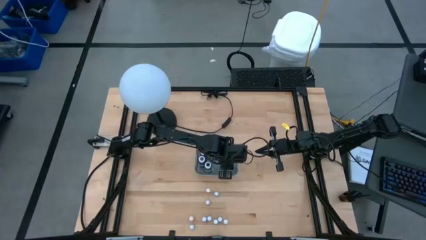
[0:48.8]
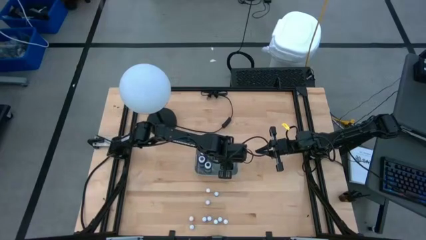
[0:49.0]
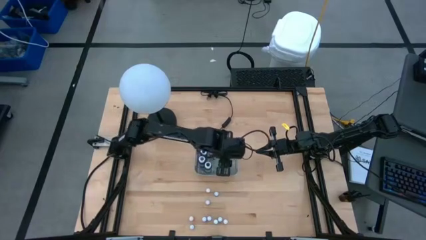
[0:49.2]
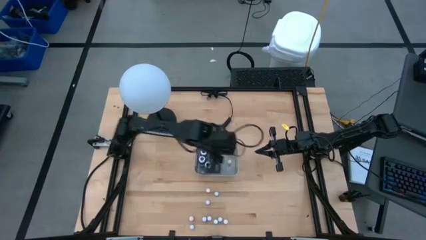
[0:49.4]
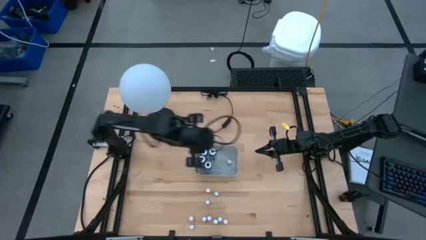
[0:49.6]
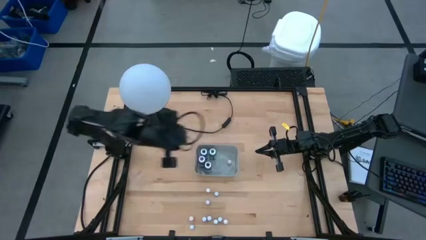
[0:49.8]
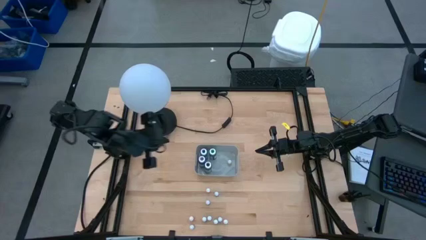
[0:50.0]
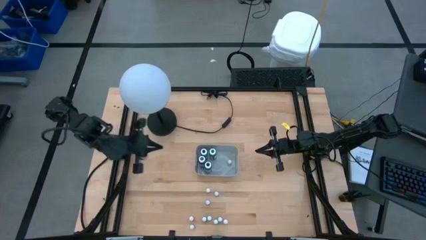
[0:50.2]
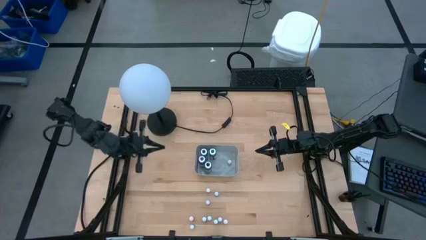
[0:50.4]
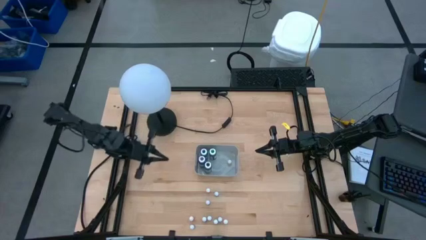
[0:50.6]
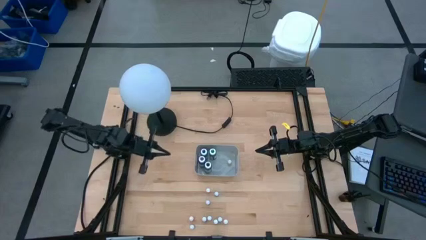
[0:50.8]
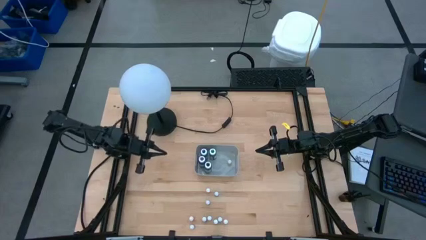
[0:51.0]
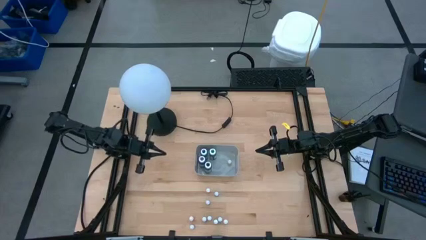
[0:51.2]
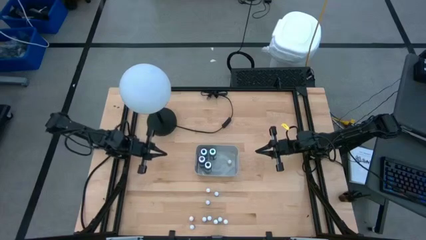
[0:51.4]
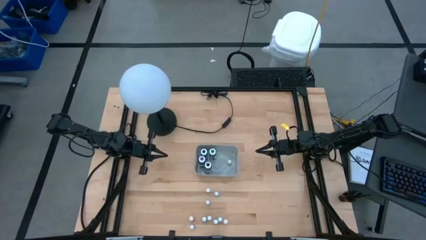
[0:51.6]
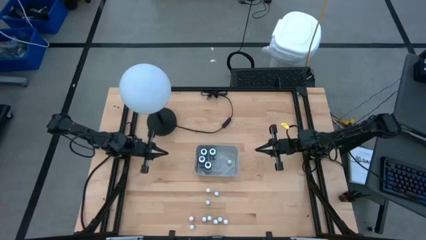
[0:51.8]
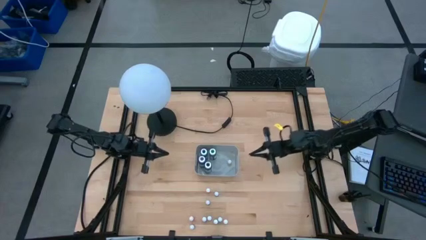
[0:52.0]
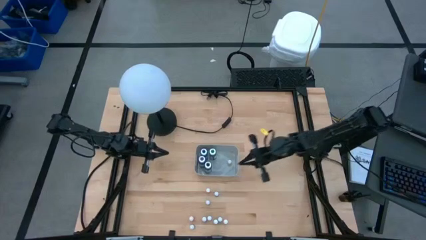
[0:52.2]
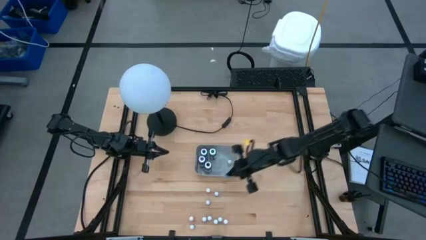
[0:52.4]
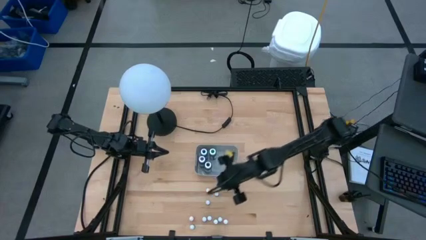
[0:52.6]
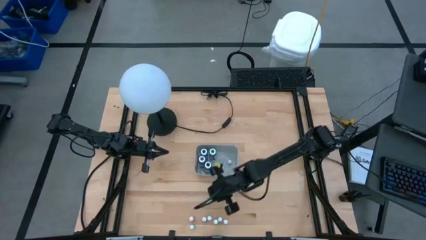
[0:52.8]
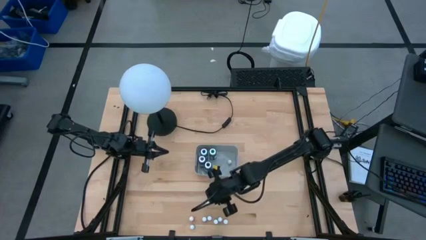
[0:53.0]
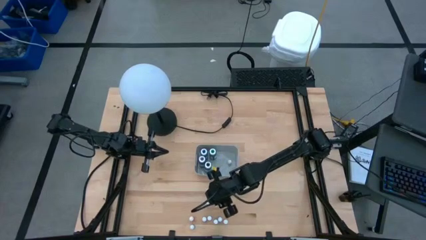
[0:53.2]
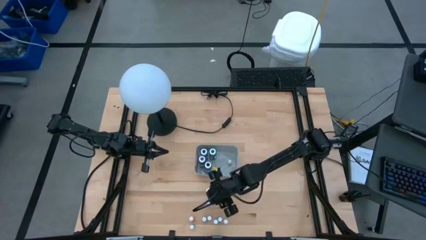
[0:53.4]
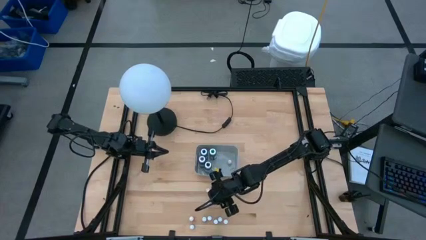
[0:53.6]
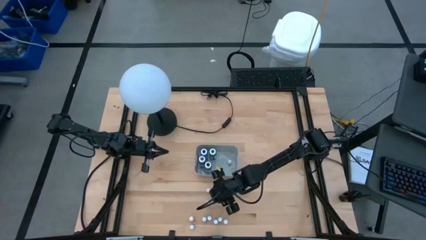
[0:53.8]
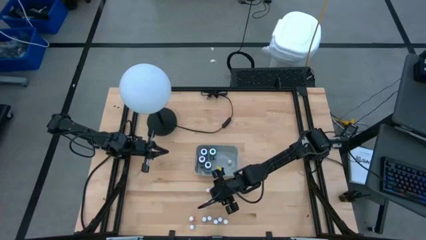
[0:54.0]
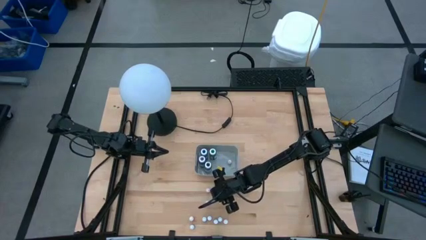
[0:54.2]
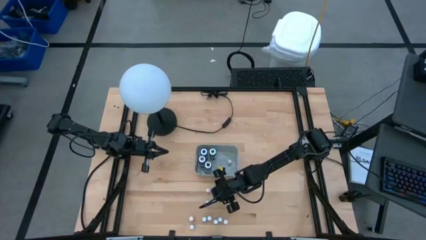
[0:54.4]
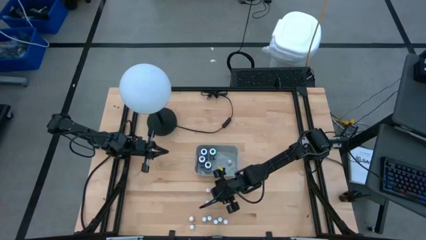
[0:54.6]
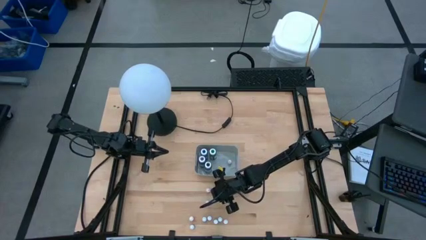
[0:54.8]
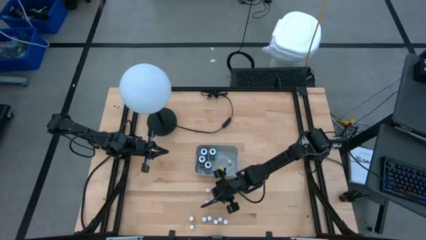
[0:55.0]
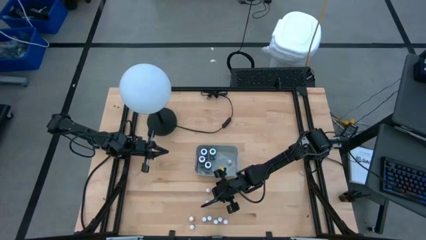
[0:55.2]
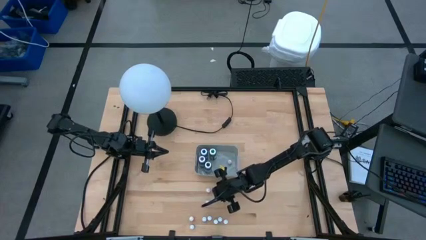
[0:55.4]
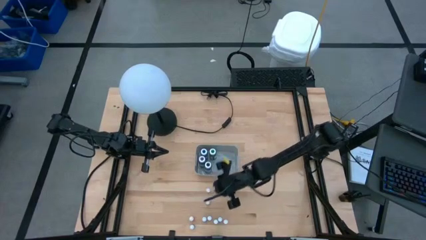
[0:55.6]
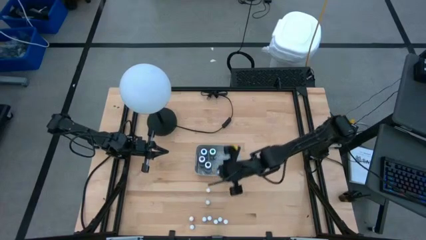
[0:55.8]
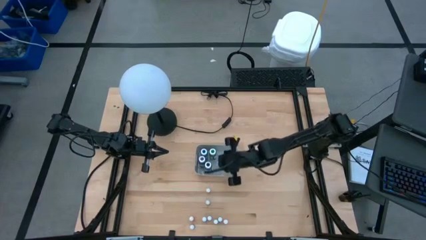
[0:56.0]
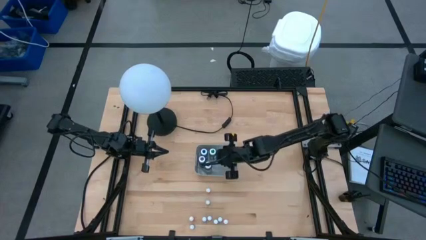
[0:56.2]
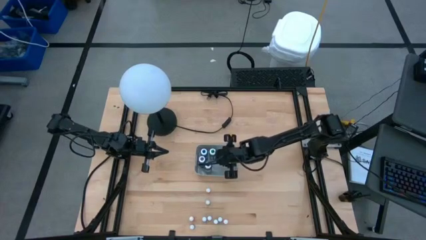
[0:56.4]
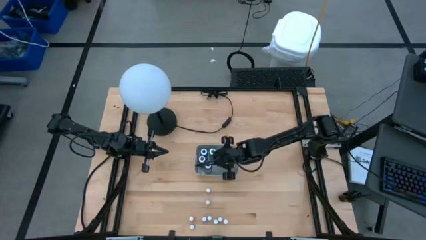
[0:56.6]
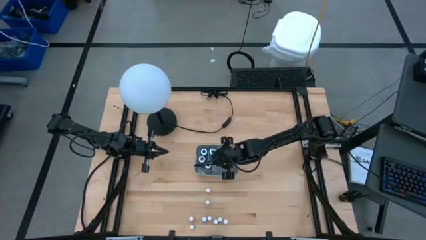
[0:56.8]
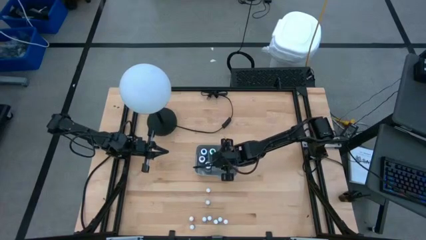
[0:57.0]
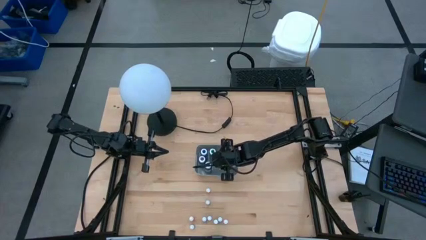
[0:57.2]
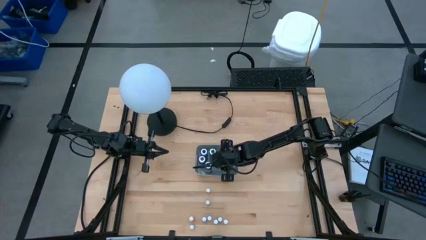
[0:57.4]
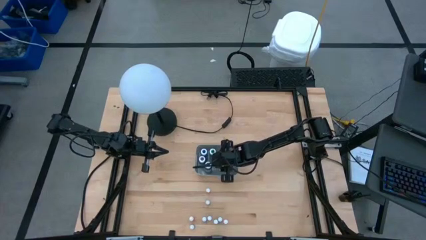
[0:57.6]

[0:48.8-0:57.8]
Task: Pick & Place food coloring
Put the small green food coloring bottle into the gray bin

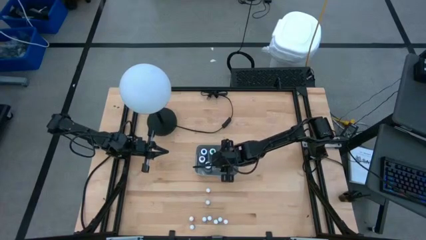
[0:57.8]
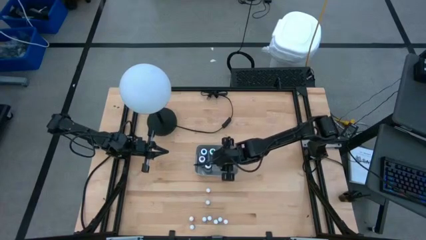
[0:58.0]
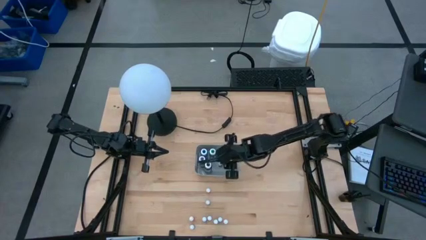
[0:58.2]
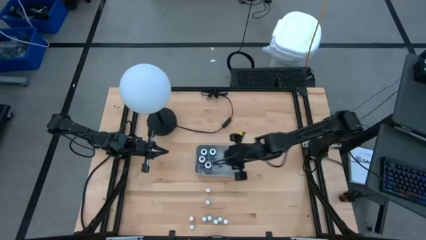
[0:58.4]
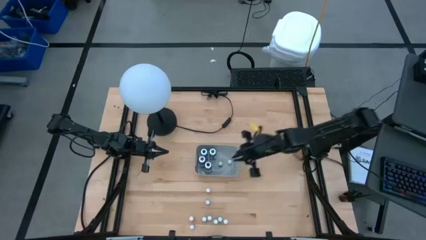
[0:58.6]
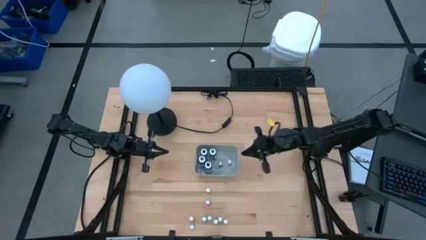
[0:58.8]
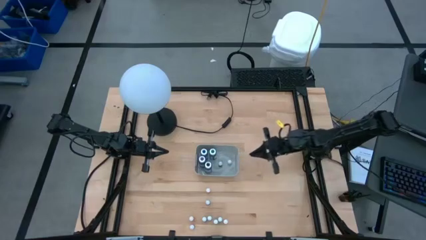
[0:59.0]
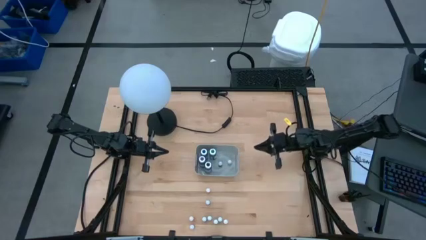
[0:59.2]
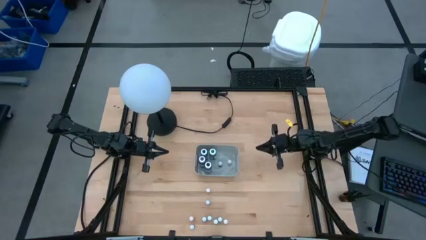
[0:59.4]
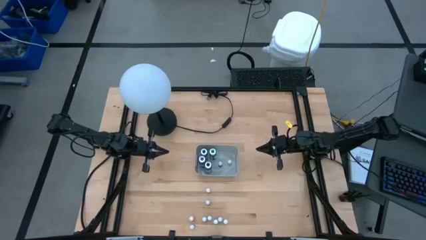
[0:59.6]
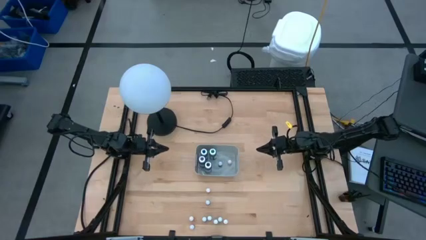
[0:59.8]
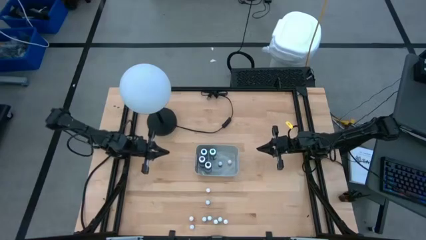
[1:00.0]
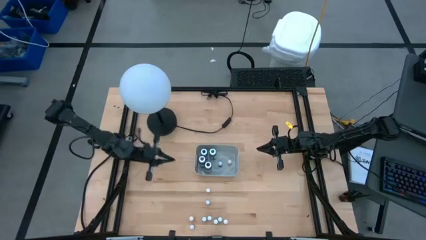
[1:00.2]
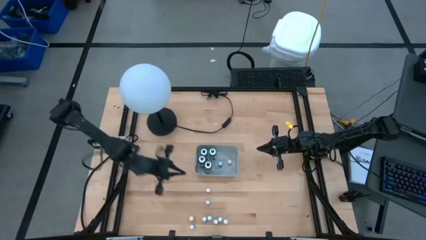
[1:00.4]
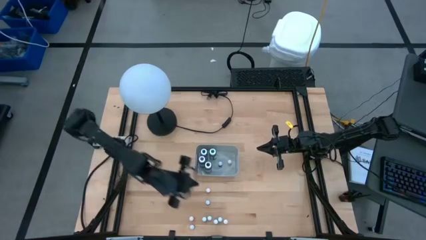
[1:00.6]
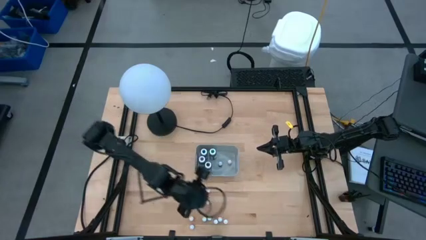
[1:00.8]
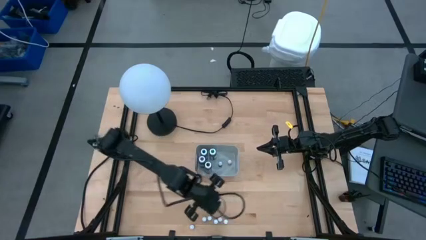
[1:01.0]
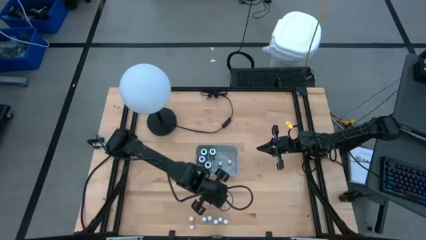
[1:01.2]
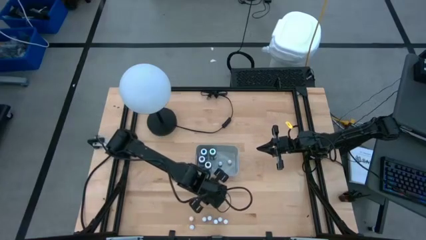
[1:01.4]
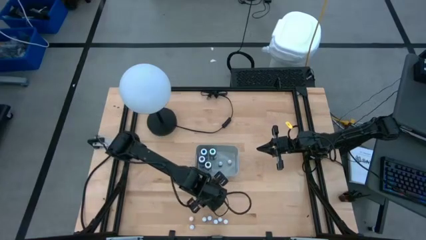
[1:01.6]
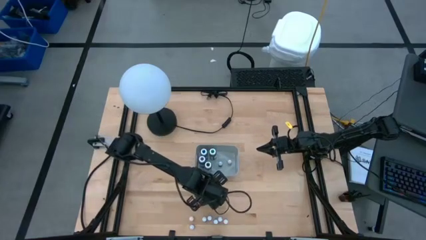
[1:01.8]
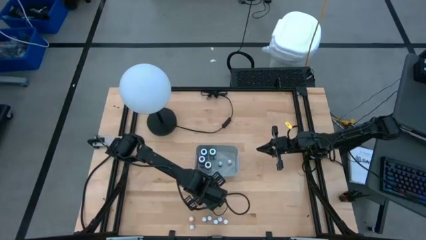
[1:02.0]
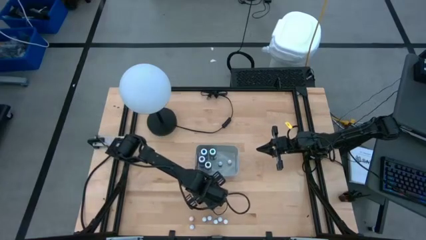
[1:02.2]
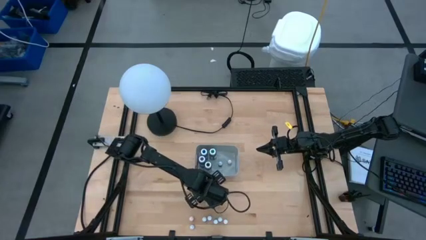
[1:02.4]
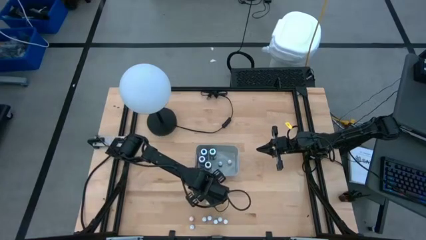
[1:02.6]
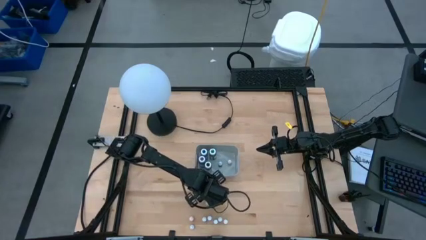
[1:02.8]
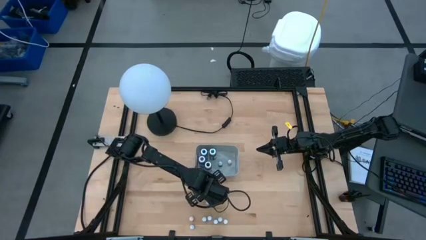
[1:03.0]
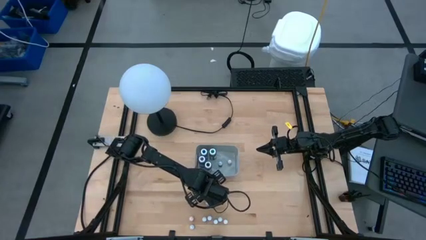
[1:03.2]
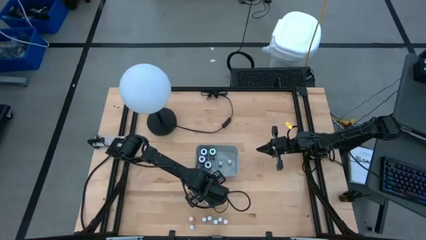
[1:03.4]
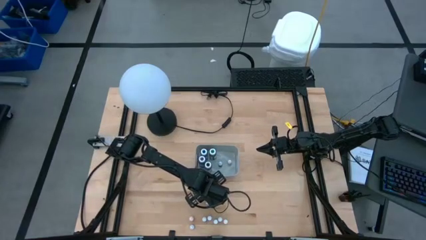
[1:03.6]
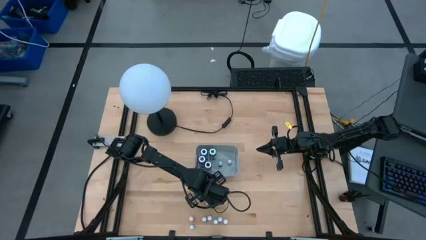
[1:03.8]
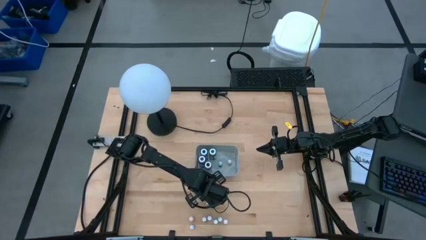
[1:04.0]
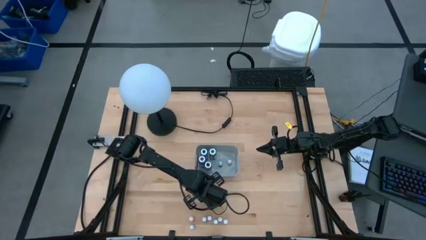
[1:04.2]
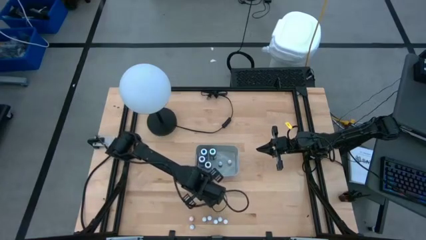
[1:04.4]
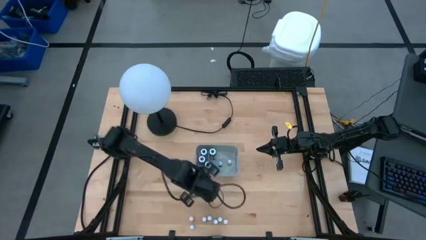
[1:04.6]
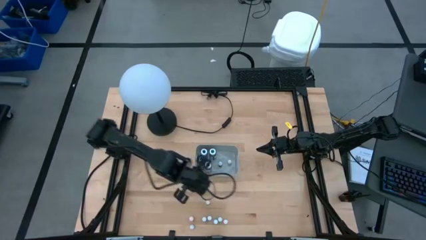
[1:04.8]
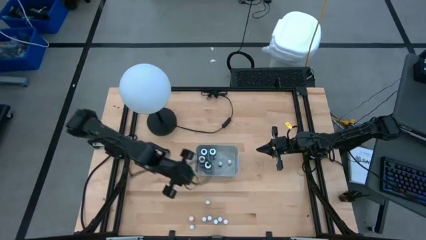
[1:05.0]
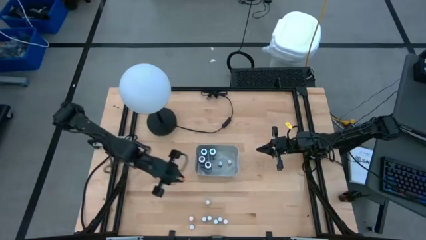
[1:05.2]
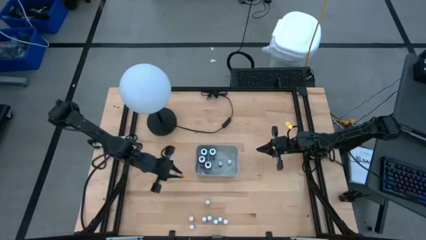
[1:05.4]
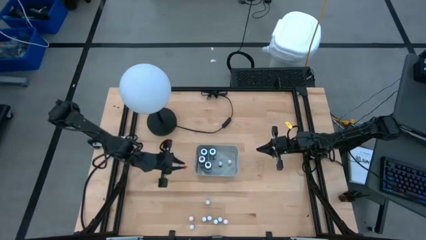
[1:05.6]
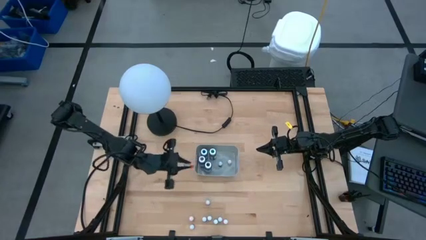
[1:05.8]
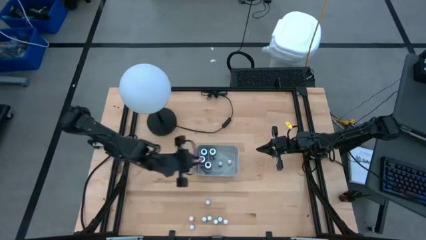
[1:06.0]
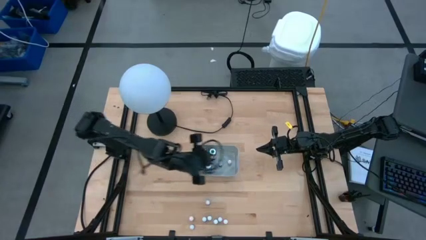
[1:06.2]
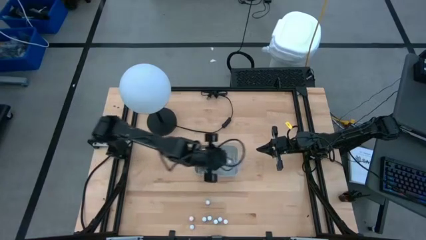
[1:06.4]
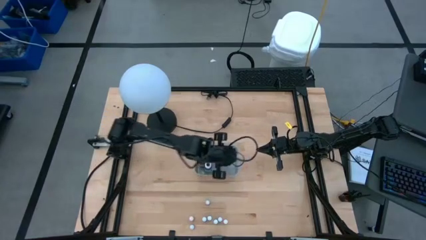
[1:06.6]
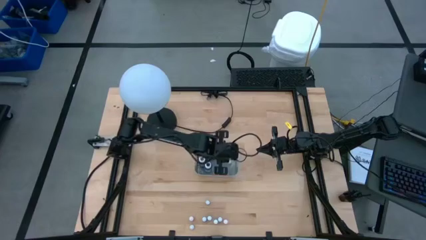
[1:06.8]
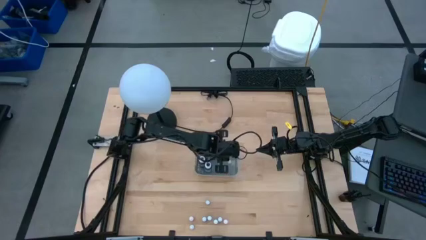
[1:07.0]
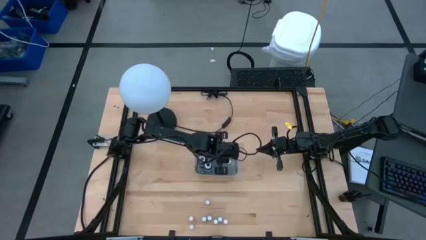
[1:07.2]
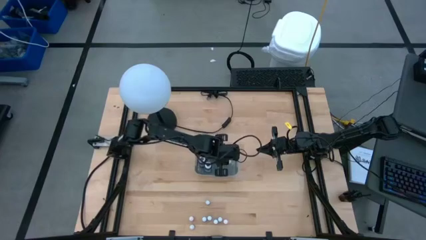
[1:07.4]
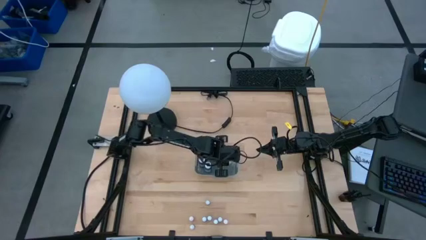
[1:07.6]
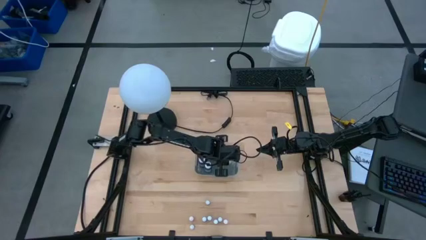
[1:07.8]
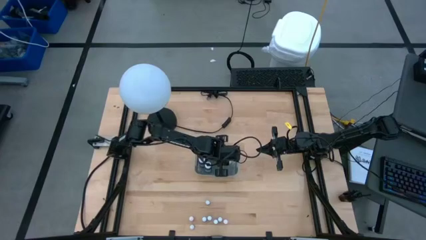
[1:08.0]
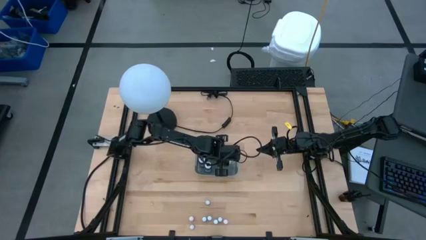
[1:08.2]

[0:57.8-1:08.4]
Put the small orange food coloring bottle into the gray bin
